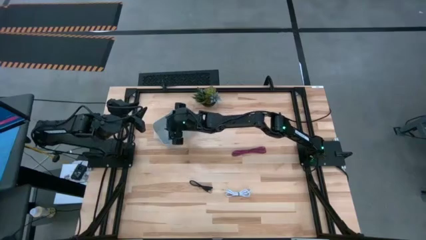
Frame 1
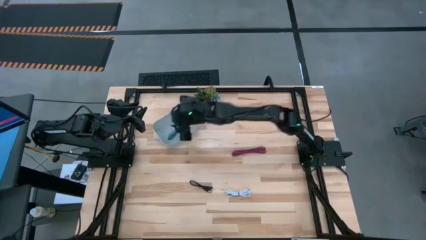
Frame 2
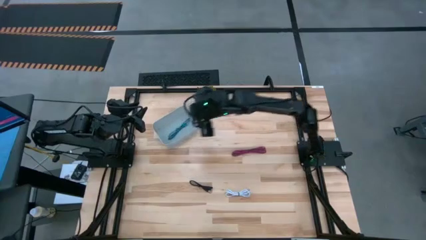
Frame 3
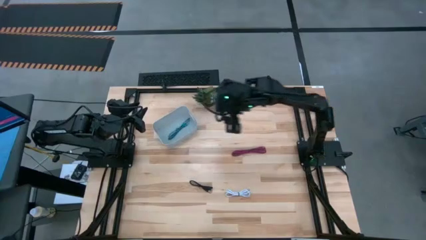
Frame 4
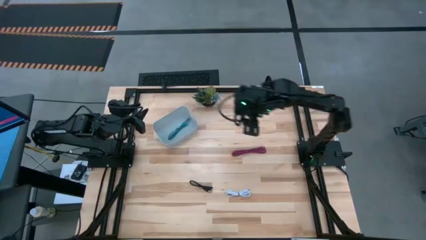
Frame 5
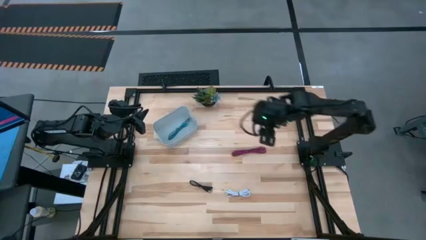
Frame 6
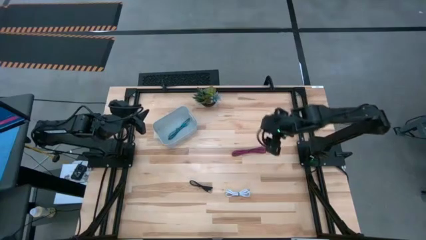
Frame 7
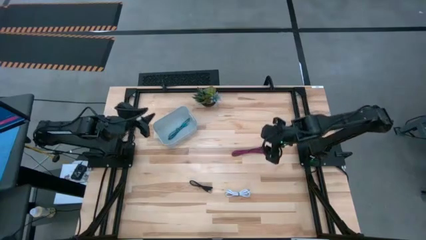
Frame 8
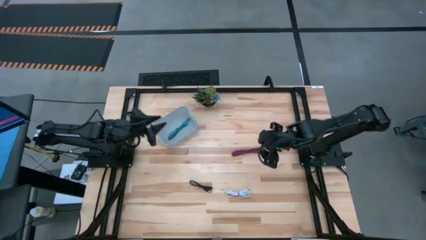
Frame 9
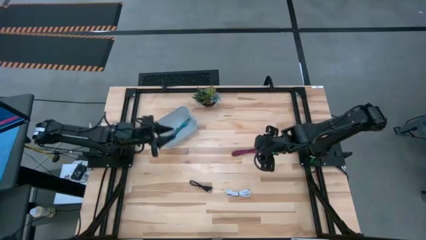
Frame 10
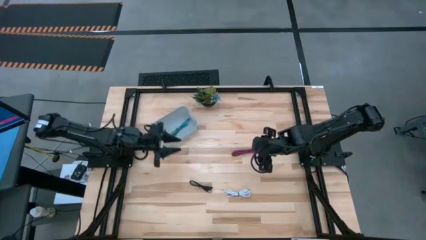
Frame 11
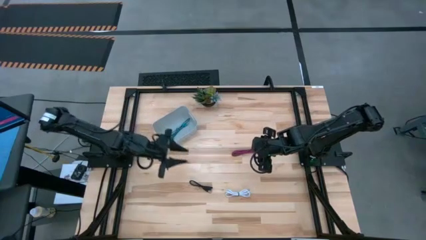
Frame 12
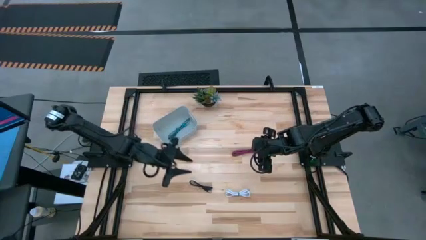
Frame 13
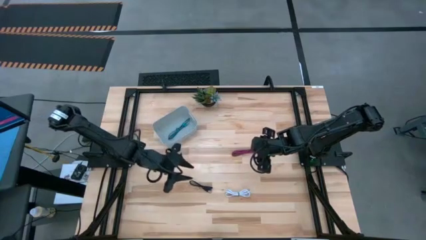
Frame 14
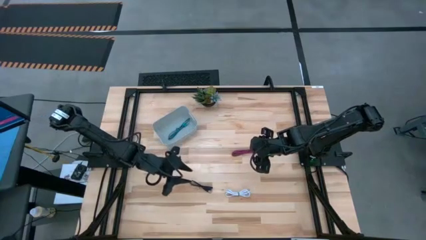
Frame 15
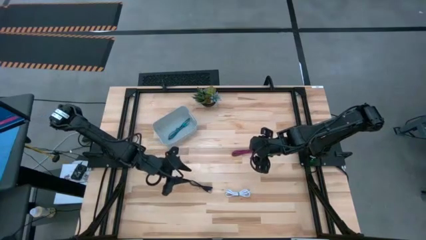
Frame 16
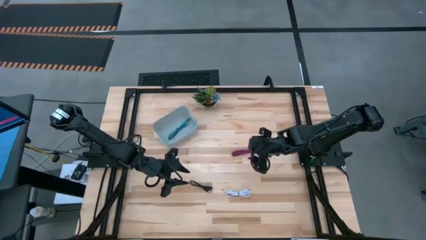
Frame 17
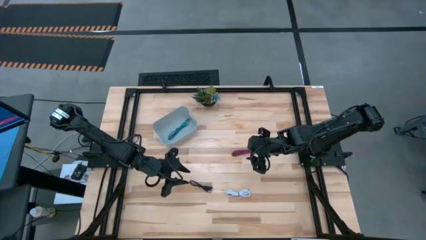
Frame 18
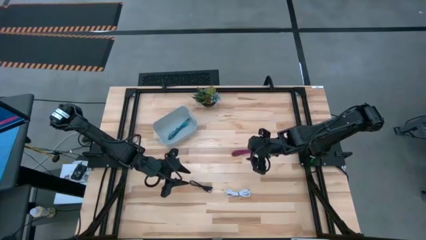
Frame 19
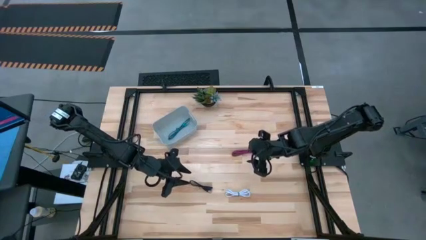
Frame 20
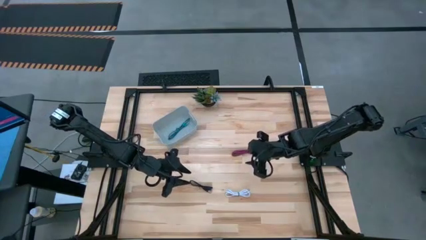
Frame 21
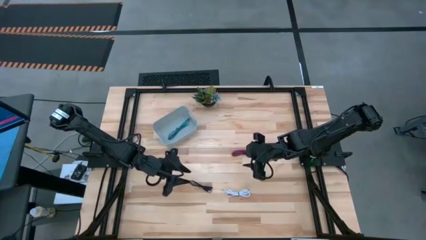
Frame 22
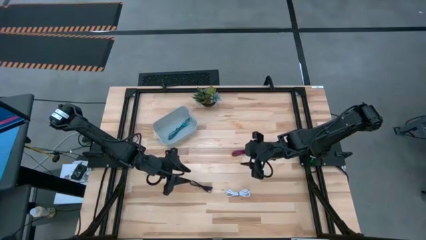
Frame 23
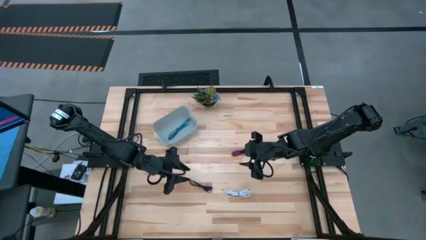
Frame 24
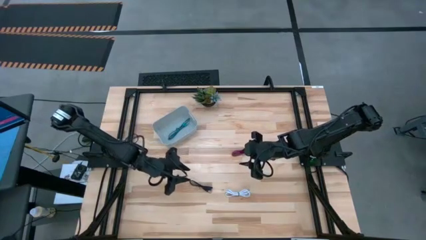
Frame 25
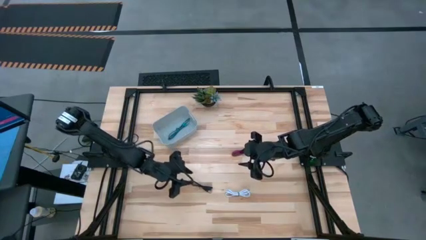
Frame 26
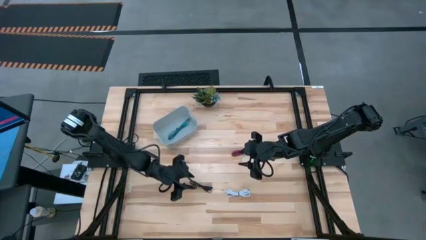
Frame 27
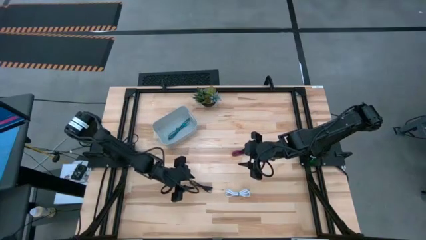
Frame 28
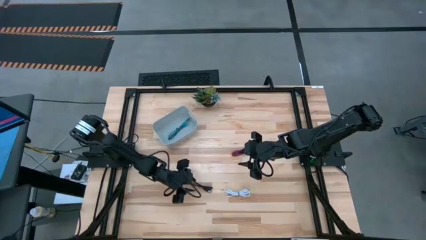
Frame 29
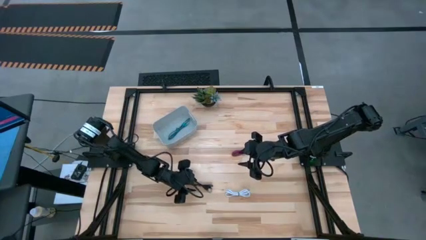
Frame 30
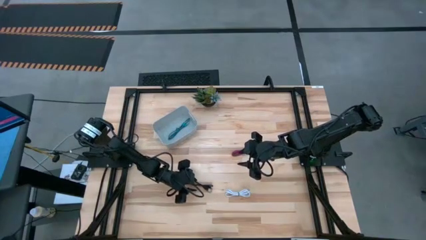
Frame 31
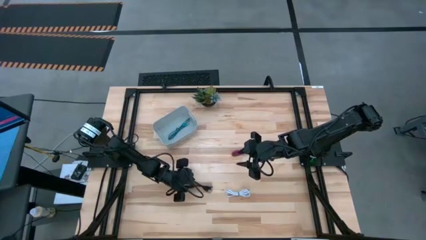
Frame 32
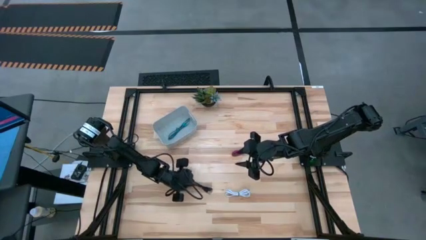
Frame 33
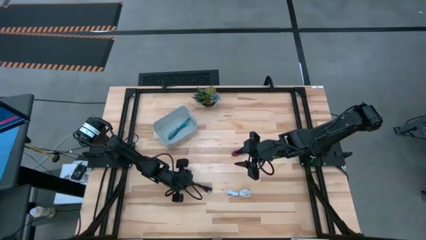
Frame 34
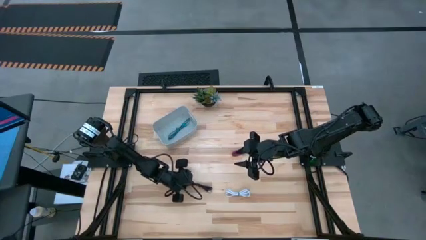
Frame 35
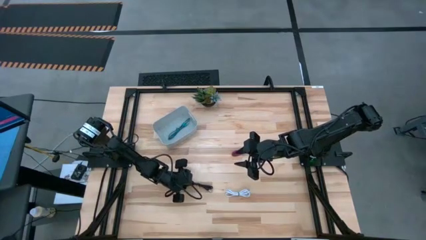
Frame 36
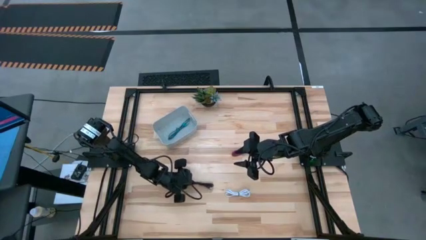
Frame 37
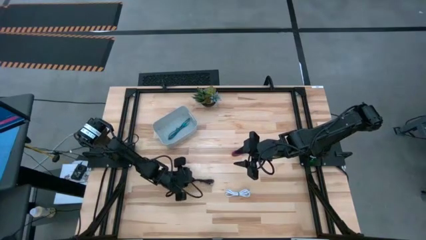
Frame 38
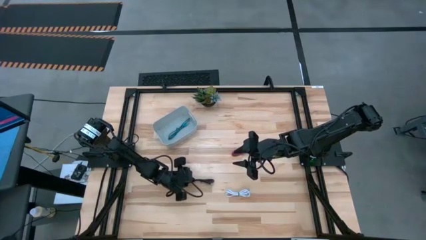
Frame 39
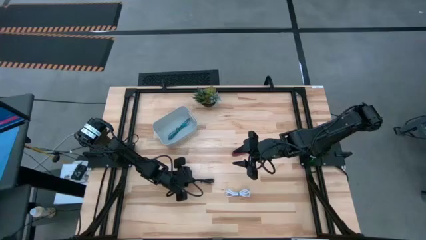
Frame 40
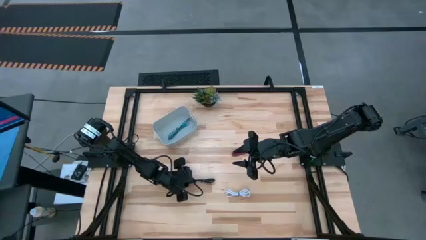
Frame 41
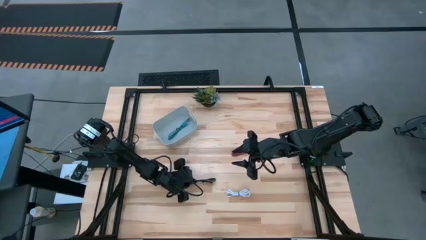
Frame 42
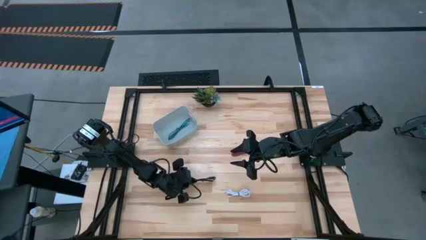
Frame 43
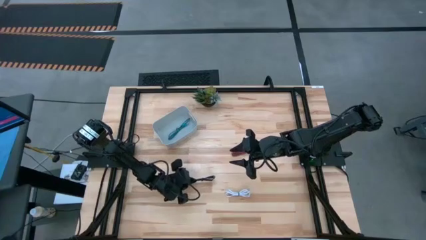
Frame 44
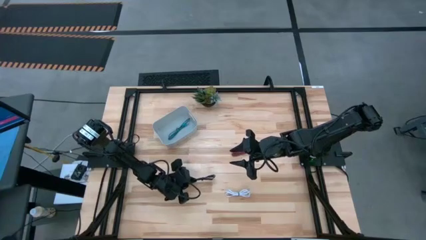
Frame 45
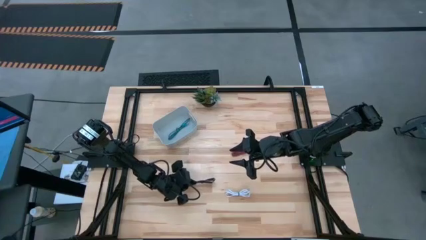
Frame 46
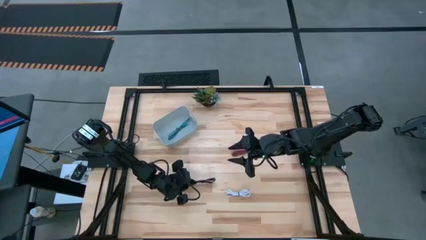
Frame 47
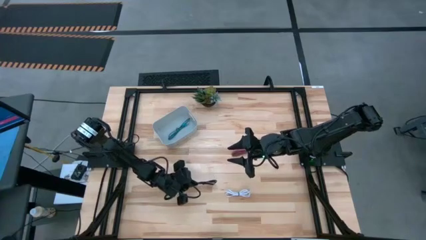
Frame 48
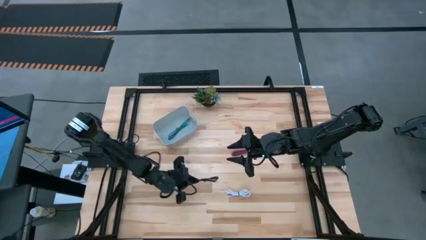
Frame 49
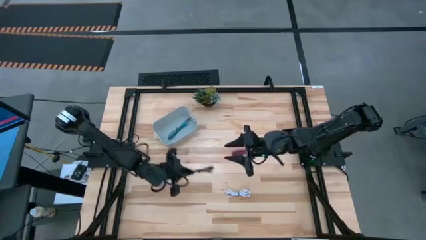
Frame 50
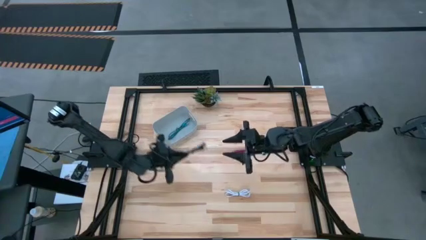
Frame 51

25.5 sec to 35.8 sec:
Task: Pick and place USB-C Cables
Put the black charger cable into the white bin

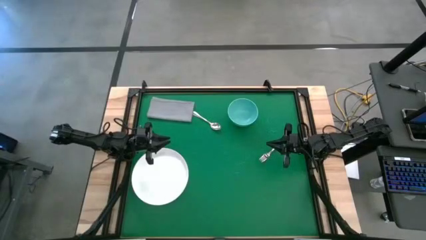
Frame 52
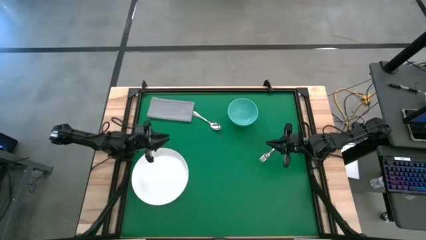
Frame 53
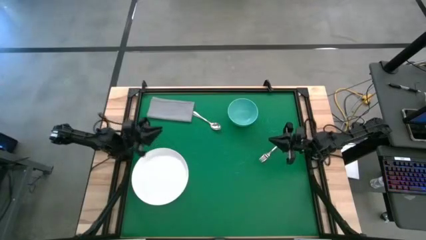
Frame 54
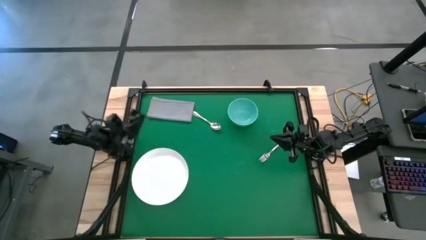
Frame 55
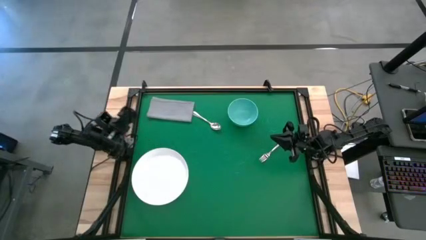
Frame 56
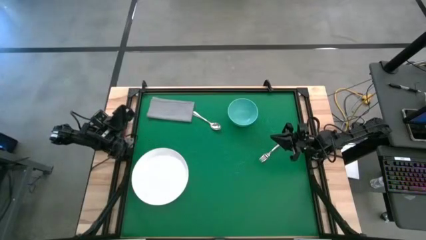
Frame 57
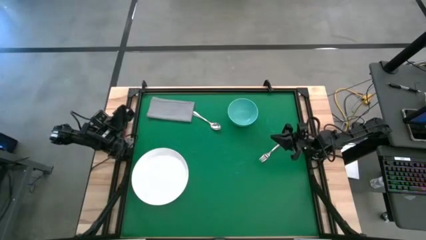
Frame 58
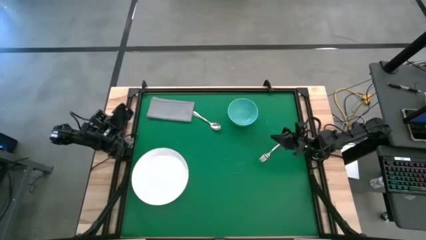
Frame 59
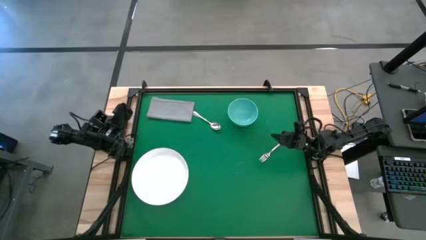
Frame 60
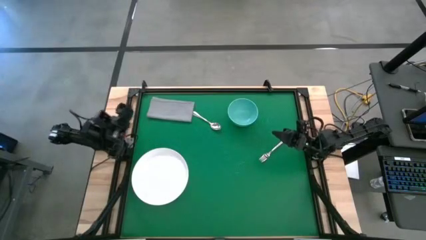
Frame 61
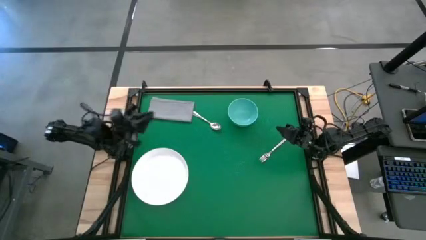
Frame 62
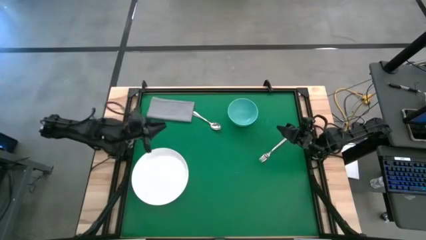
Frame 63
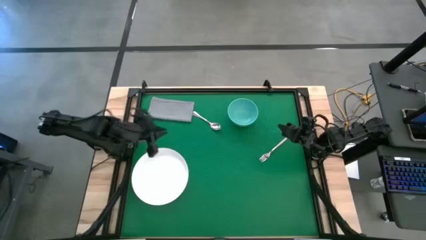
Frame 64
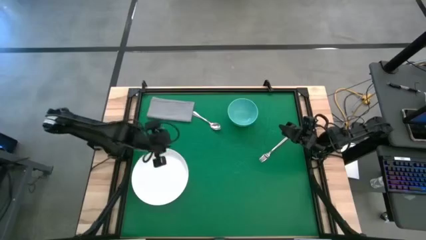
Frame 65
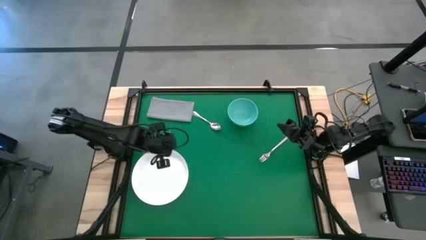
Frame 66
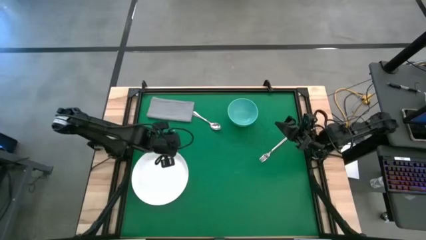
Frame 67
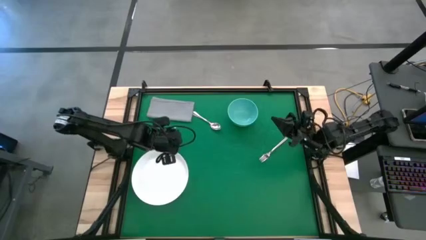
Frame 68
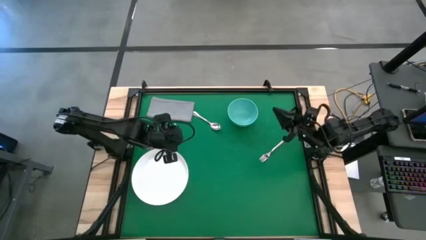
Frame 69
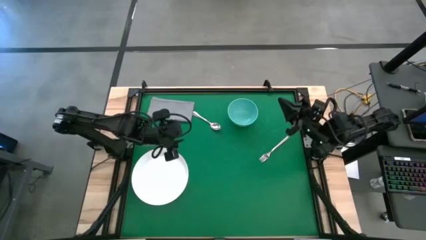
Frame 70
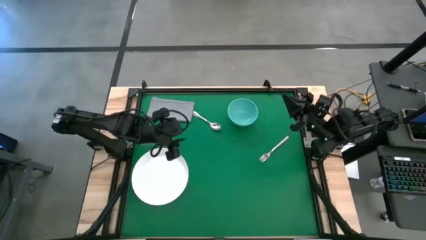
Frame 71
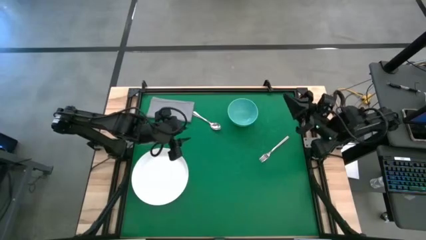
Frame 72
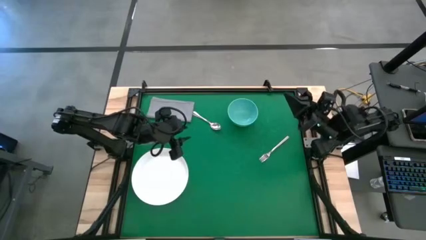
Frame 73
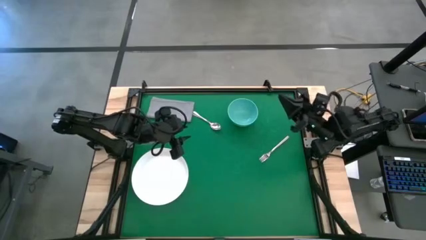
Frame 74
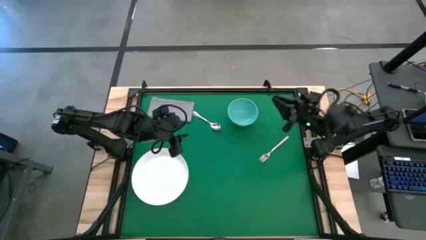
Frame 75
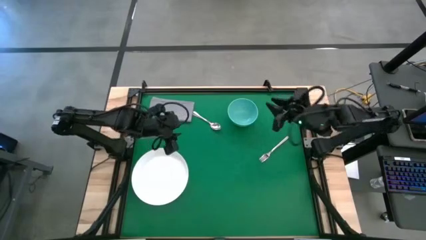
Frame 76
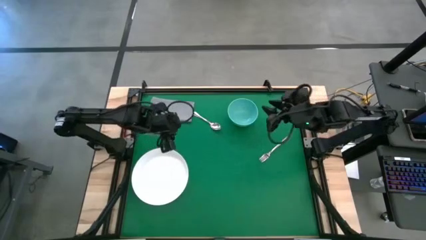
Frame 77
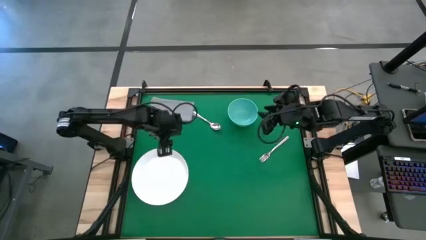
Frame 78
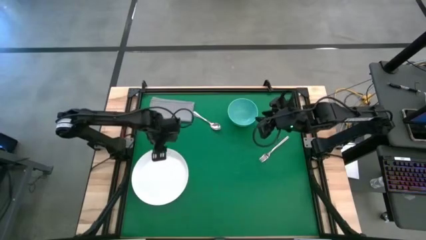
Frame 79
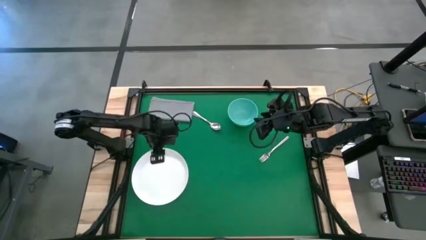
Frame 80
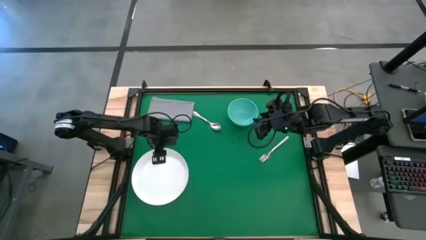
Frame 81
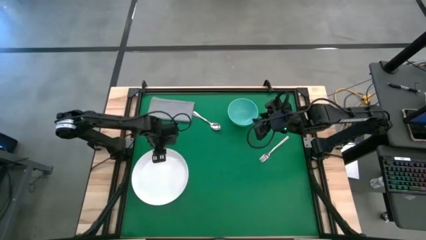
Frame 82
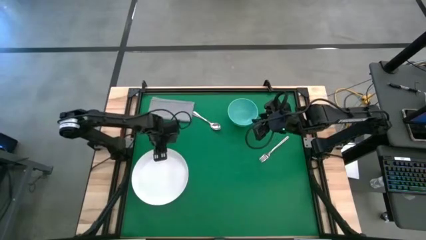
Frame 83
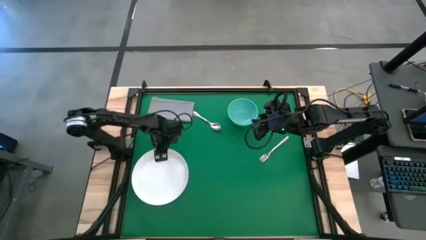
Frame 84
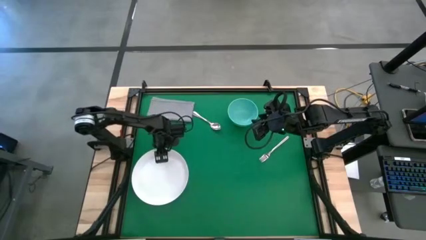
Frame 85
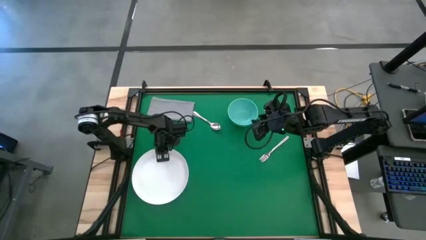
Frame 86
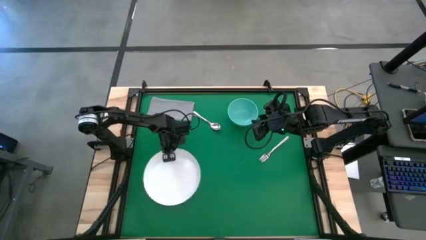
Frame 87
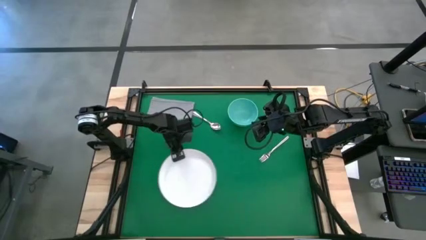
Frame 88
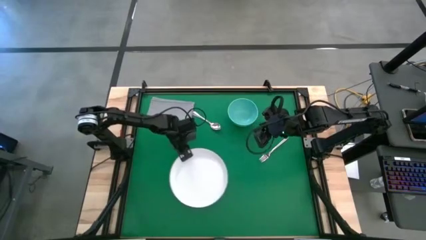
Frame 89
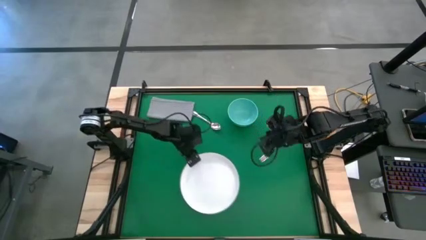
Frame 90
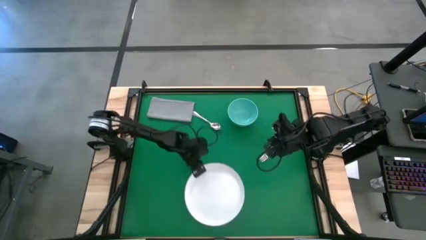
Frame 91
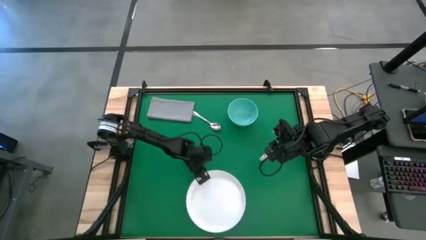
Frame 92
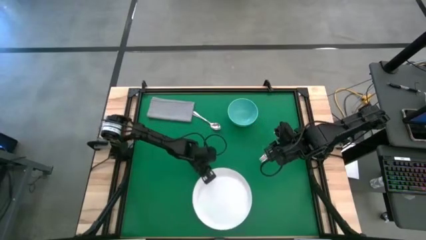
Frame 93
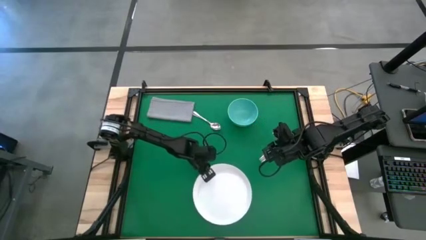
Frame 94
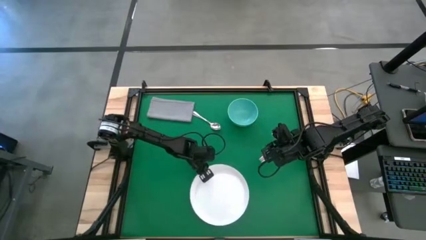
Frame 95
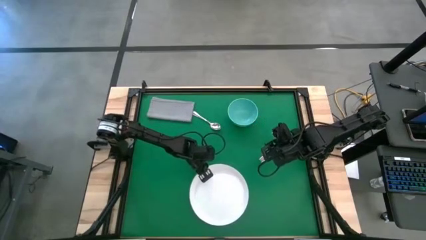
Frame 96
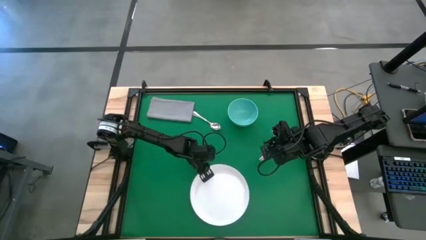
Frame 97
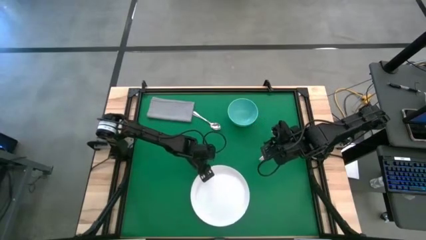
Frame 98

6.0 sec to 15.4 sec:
Task: Pick and place plate/cup/fork/spoon on tray
Prepare the white plate
